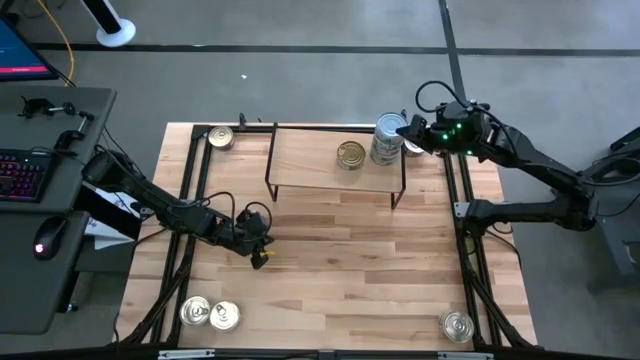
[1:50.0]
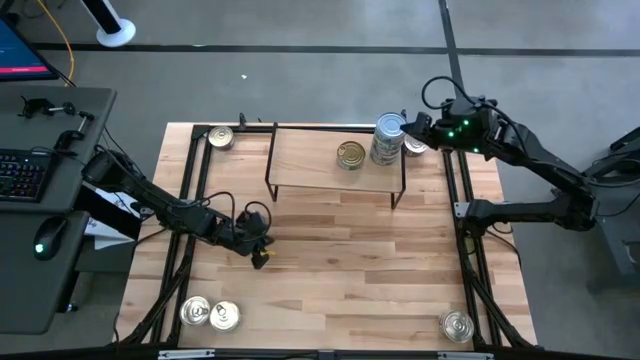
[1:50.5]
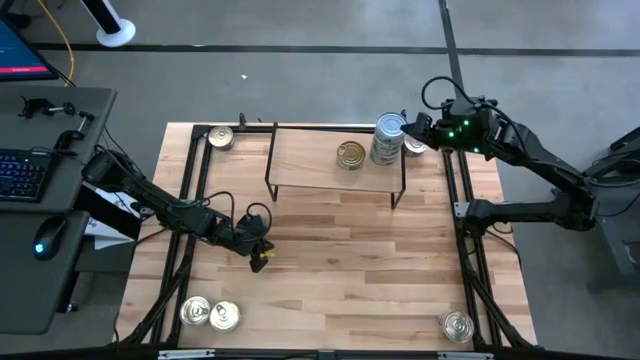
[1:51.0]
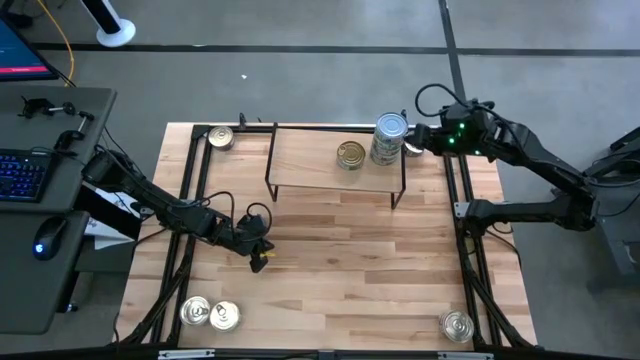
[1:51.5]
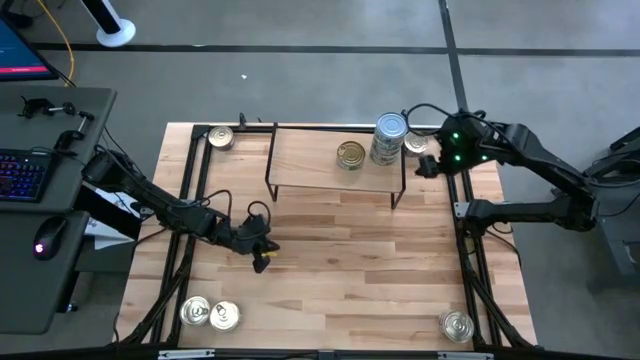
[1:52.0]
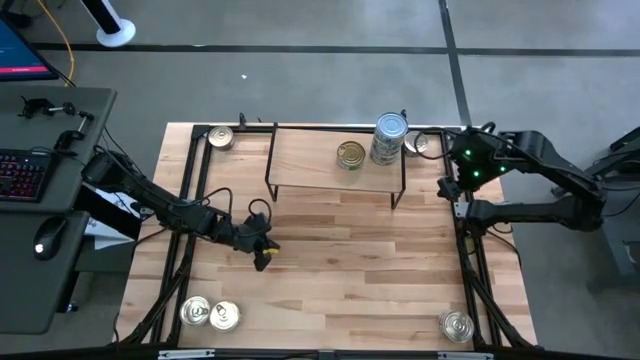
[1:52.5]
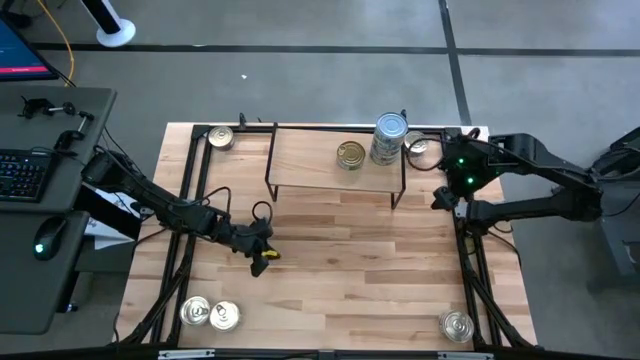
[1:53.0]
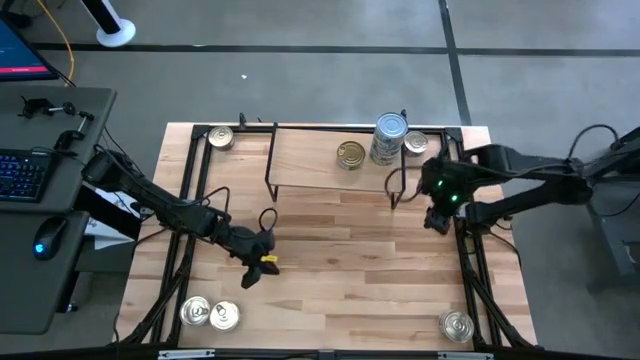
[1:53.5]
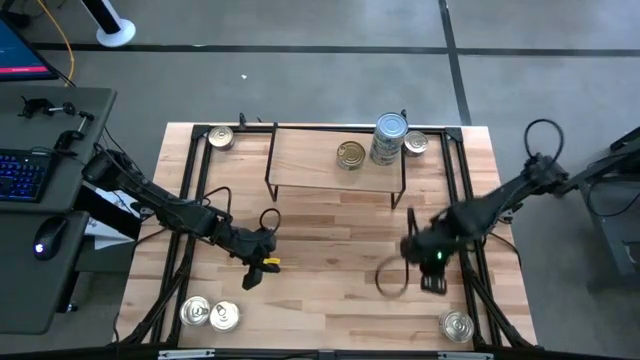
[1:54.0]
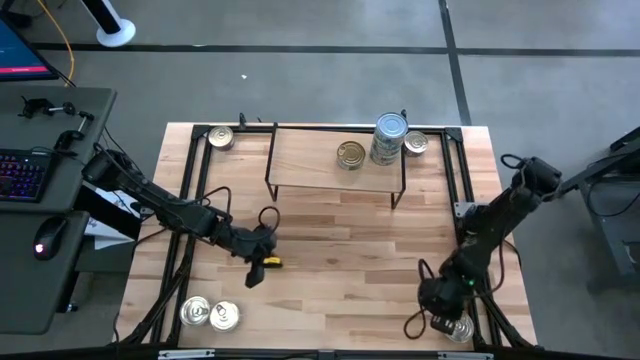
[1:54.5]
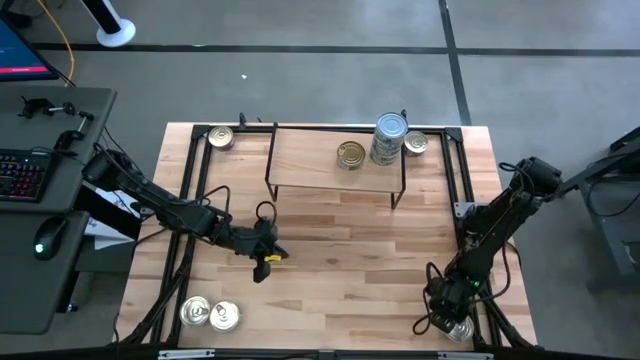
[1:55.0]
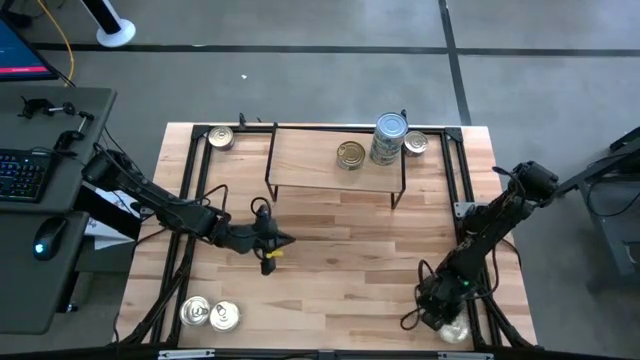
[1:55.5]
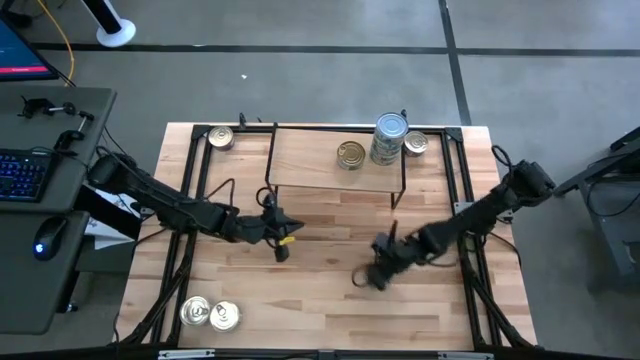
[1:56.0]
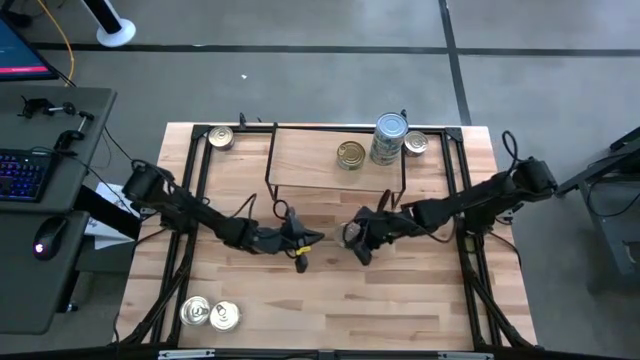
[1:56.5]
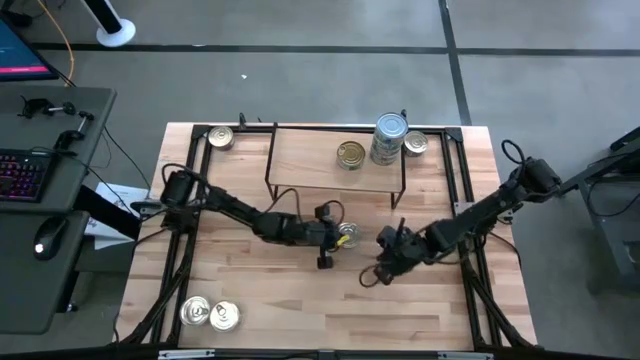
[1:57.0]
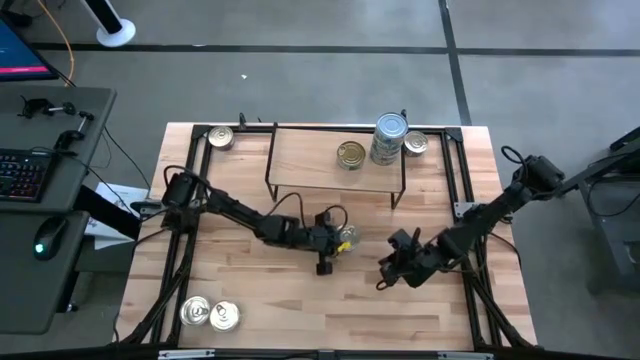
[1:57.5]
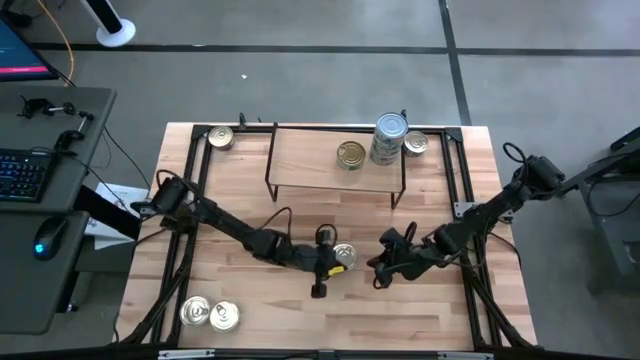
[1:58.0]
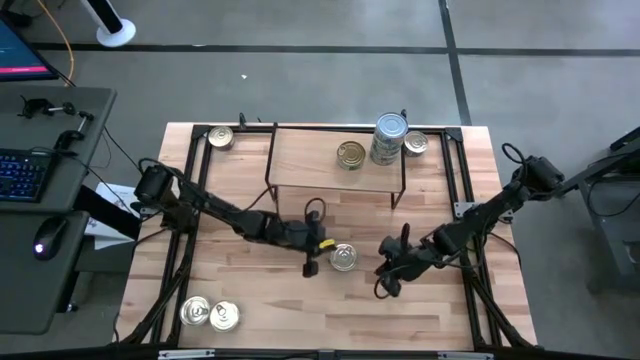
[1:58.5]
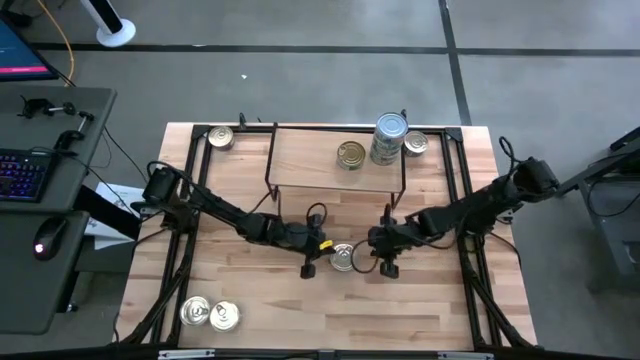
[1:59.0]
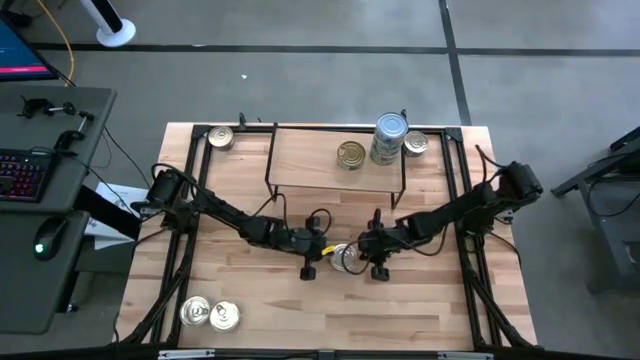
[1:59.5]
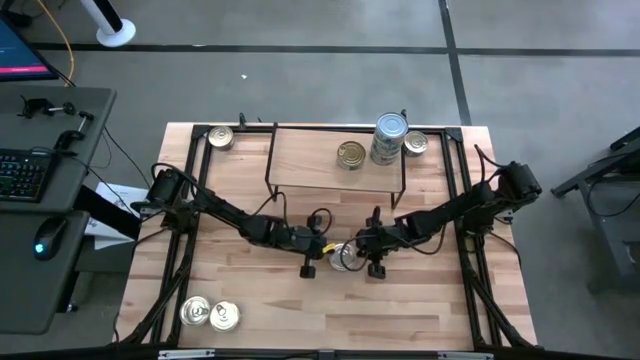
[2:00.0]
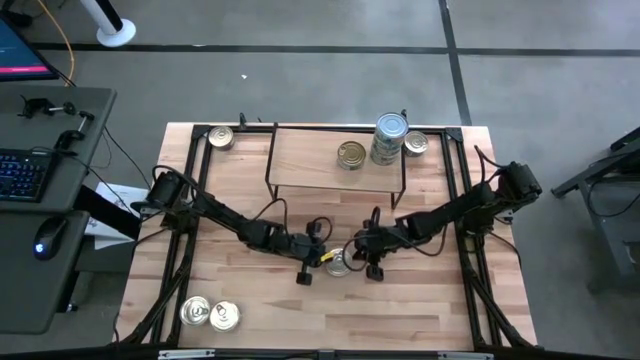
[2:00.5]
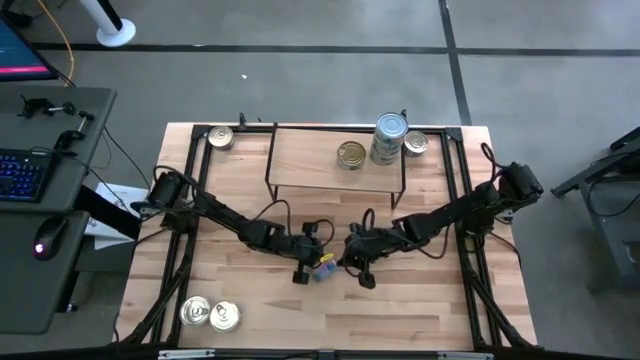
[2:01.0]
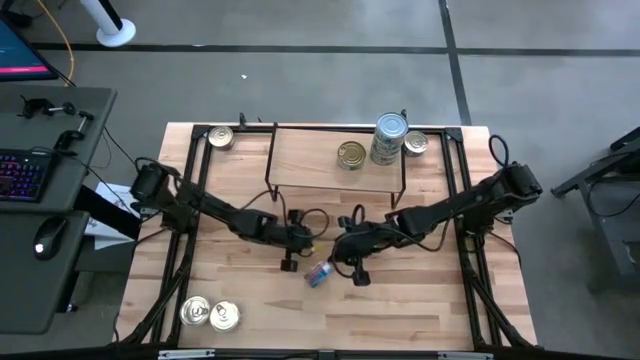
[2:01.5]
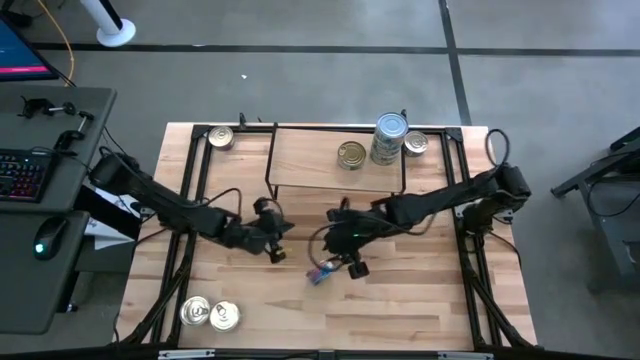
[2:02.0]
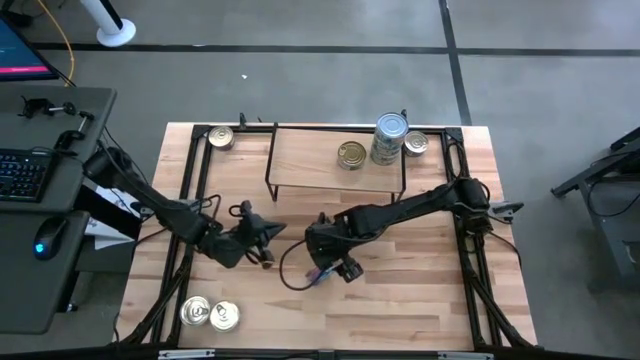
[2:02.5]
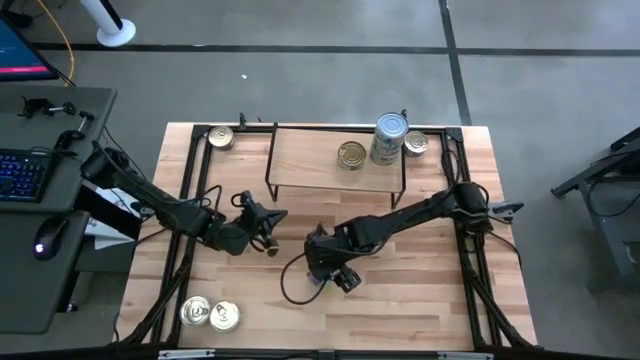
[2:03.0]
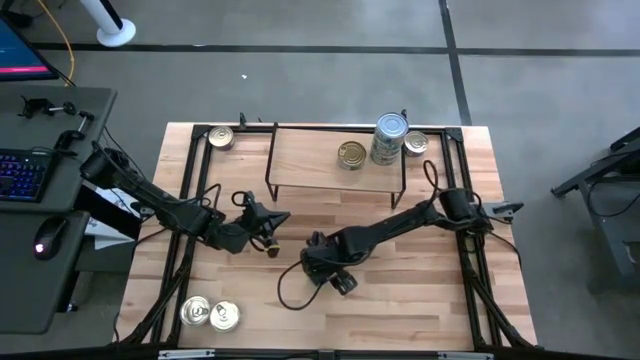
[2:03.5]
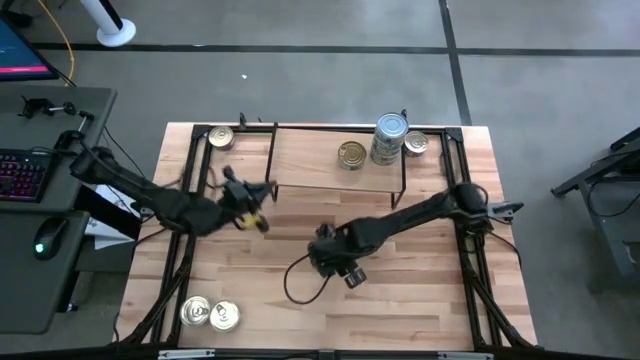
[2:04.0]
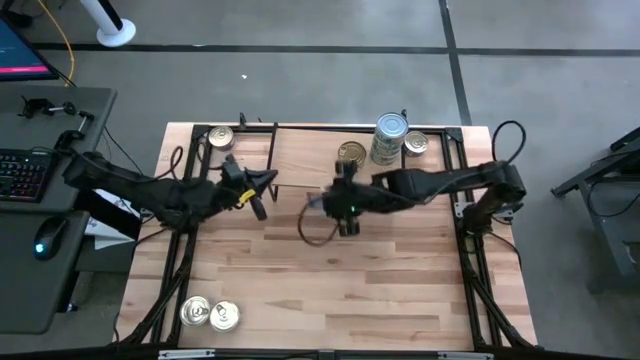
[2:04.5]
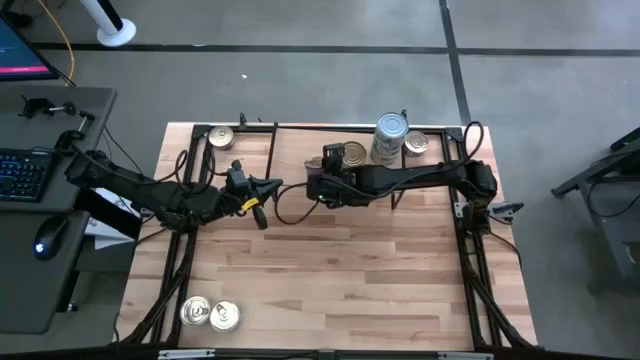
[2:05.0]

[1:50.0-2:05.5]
Task: Stack canned seafood by type on shelf
Put the blue pink tuna can on the shelf

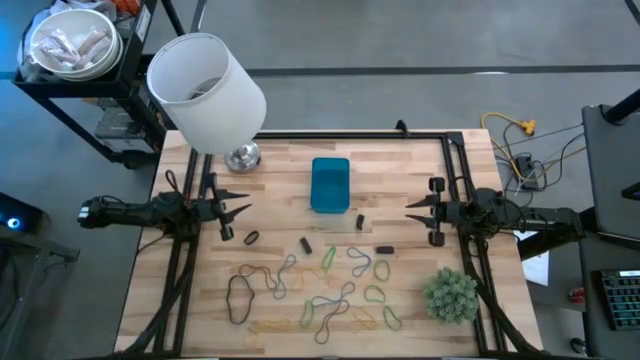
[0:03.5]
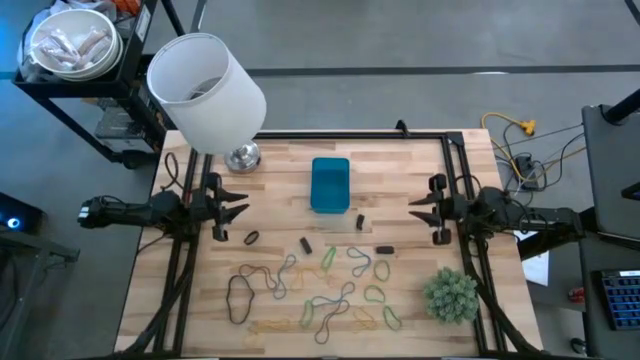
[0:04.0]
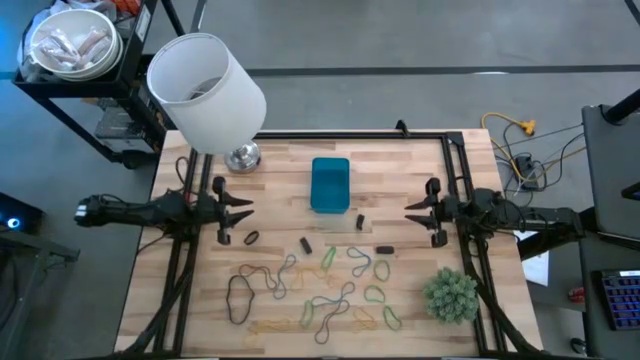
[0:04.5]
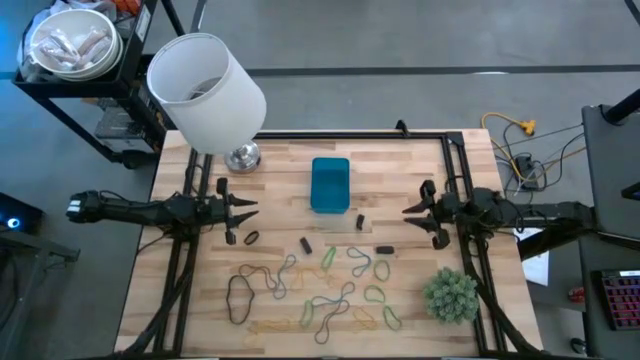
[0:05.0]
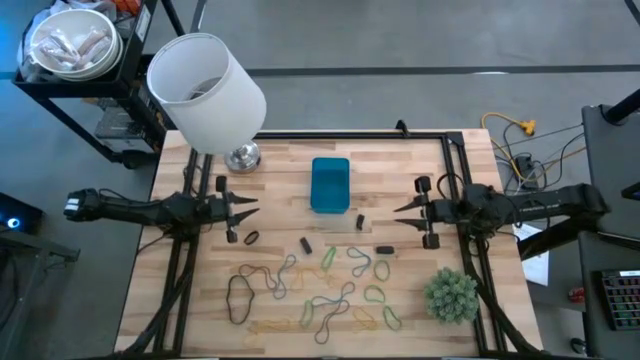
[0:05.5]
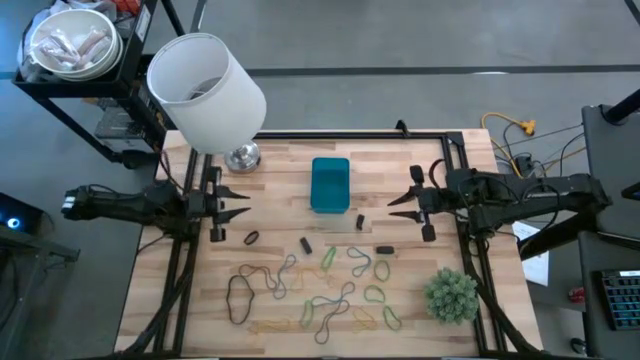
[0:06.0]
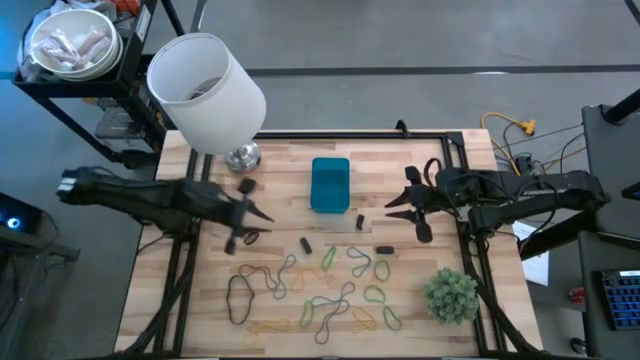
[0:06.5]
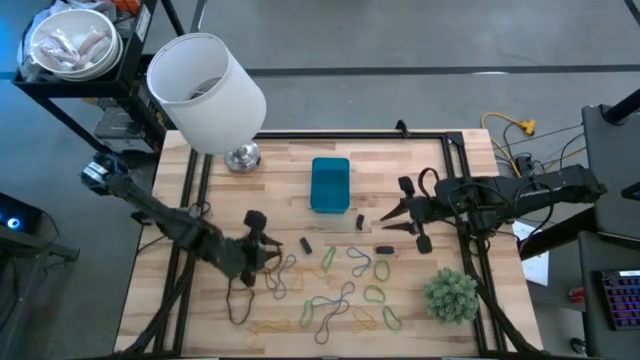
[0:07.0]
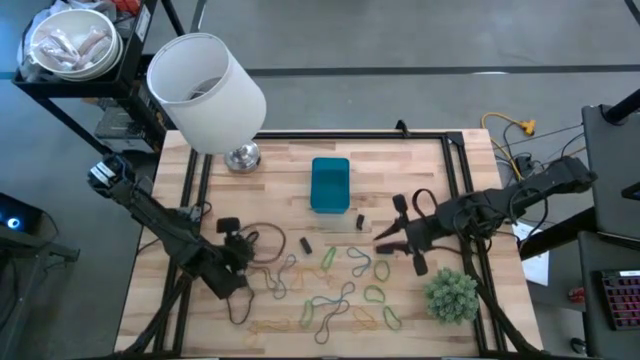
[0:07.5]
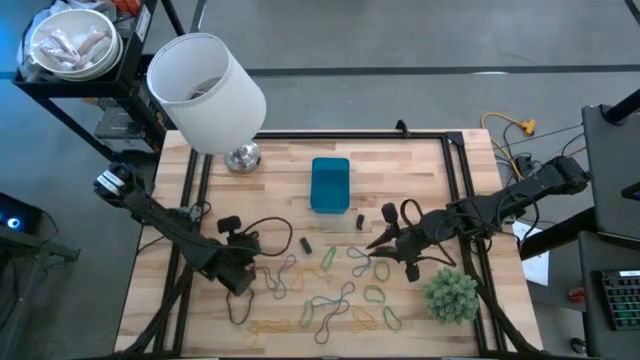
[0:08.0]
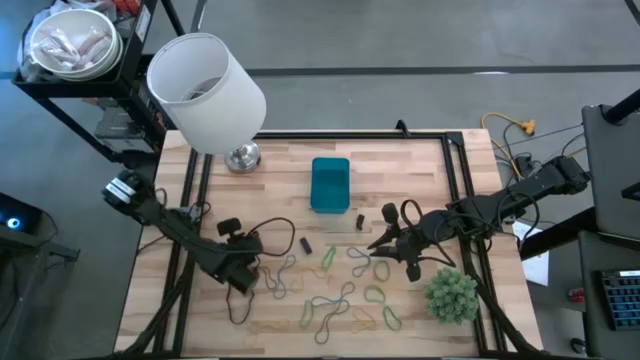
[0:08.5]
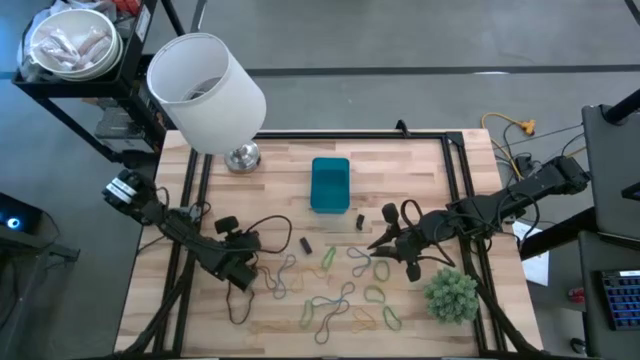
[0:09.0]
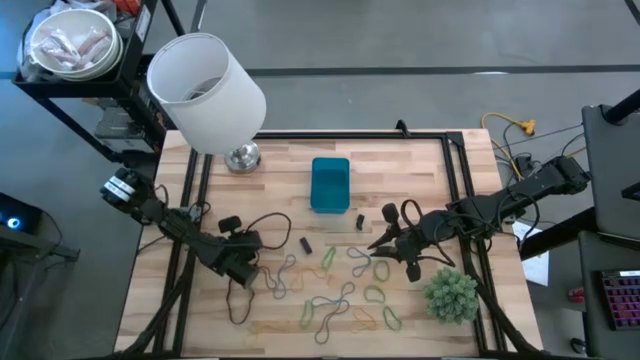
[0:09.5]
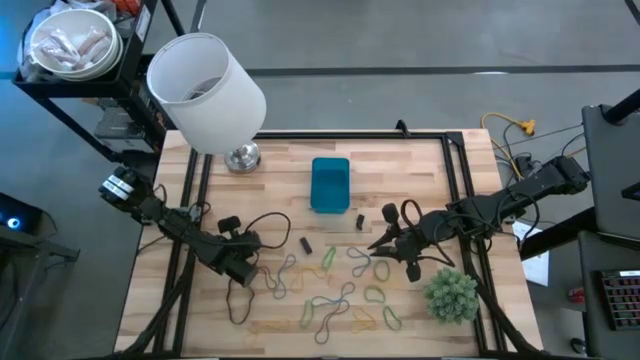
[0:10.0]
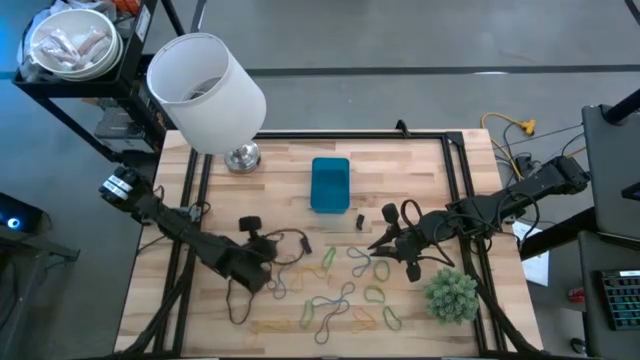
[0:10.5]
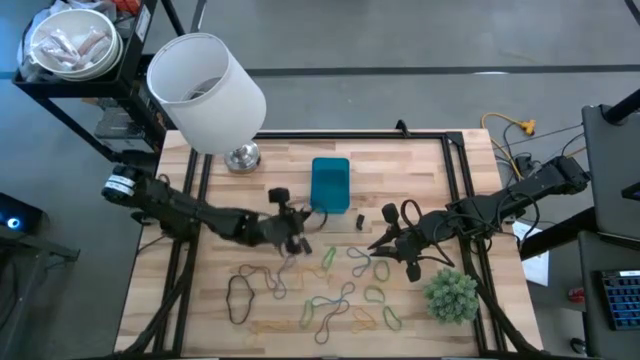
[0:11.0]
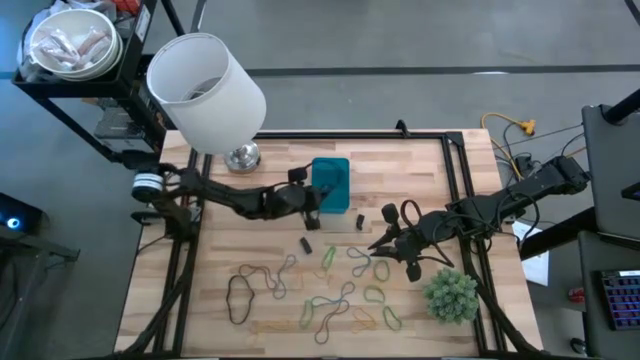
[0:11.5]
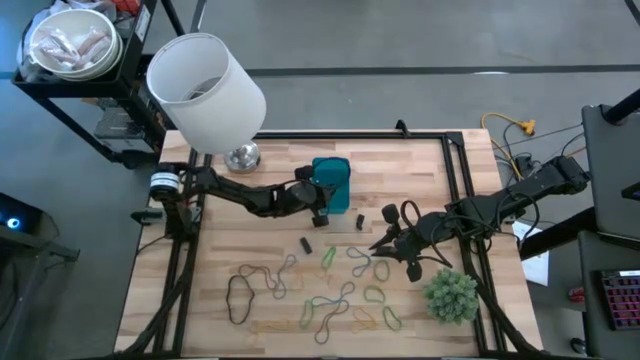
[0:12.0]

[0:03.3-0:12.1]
Task: Pick and place rubber bands into bin
Put the black rubber band into the blue bin
